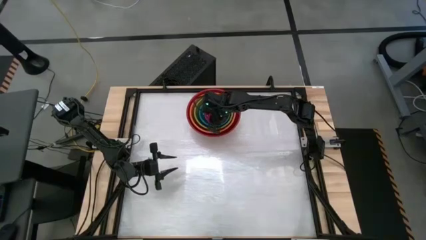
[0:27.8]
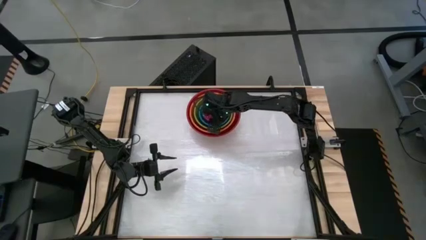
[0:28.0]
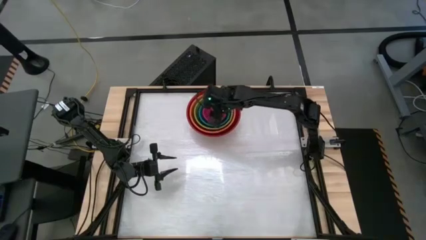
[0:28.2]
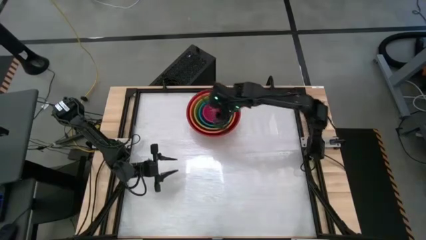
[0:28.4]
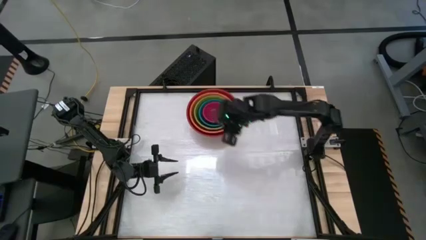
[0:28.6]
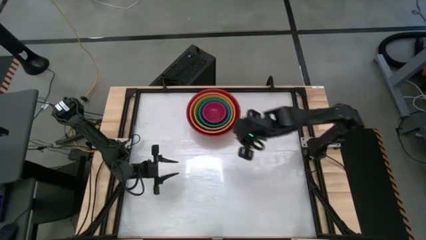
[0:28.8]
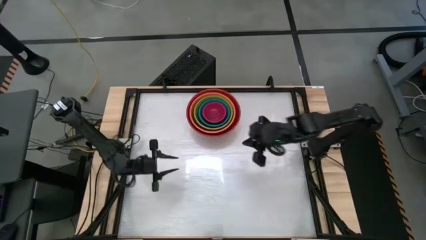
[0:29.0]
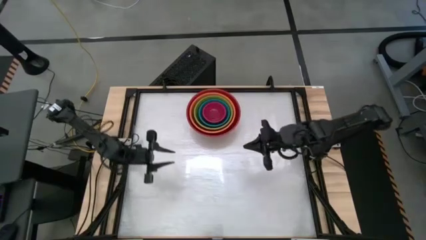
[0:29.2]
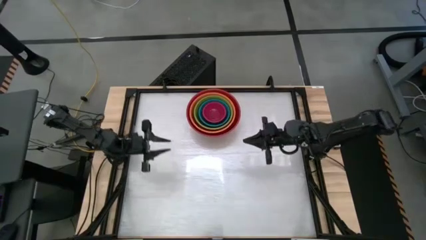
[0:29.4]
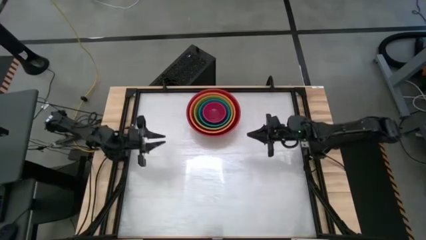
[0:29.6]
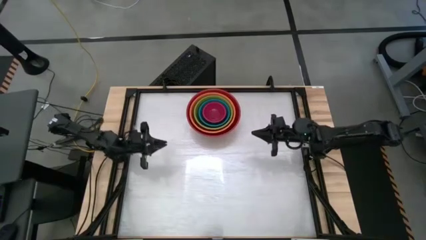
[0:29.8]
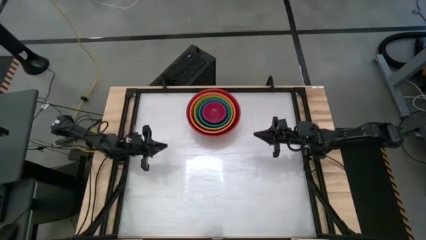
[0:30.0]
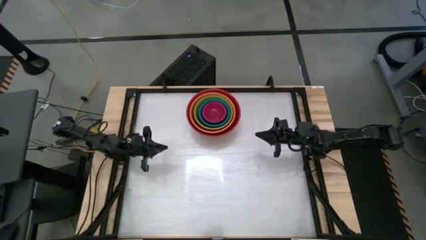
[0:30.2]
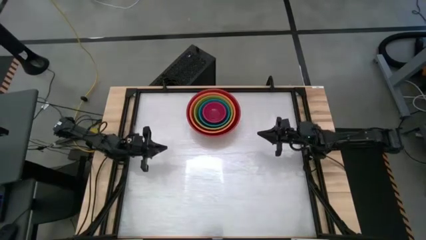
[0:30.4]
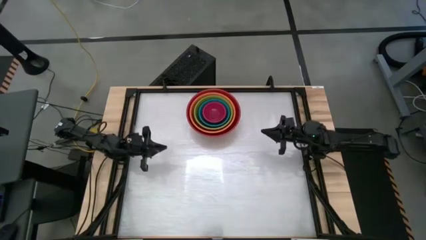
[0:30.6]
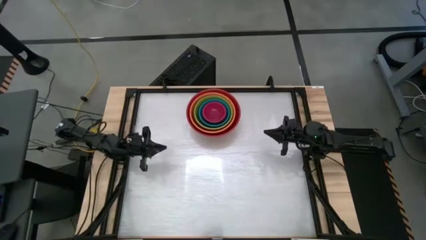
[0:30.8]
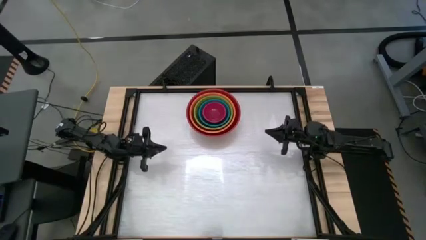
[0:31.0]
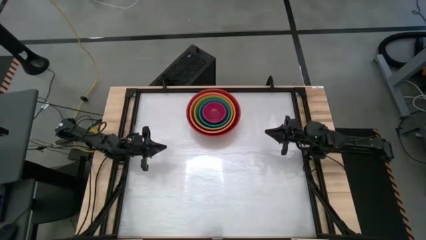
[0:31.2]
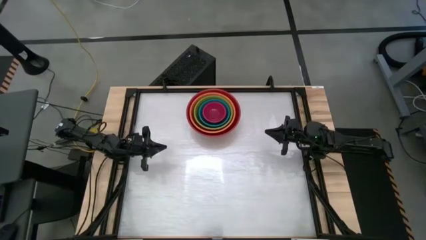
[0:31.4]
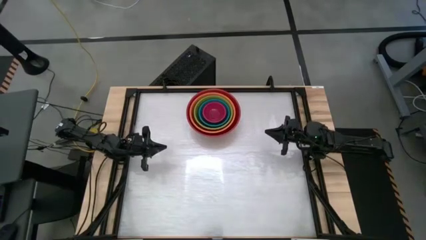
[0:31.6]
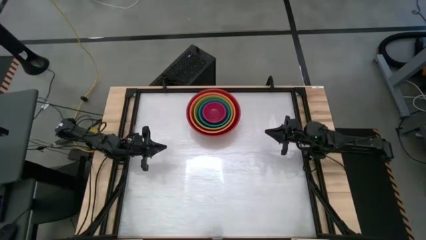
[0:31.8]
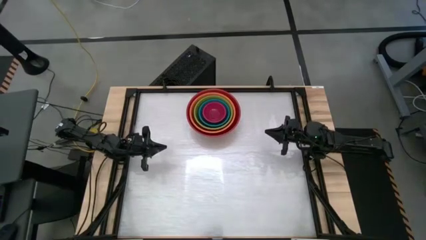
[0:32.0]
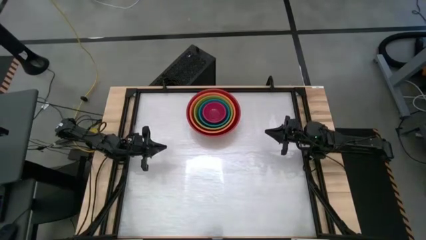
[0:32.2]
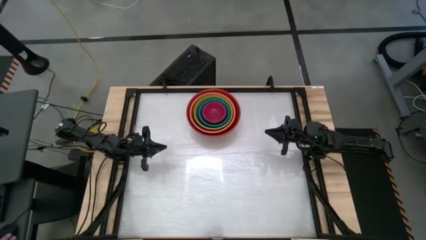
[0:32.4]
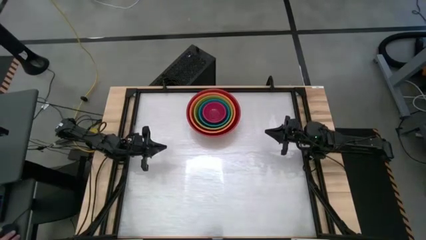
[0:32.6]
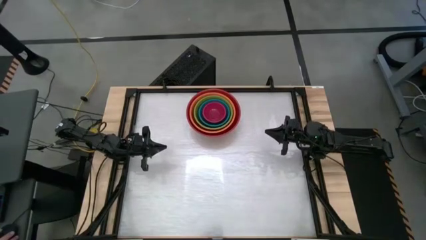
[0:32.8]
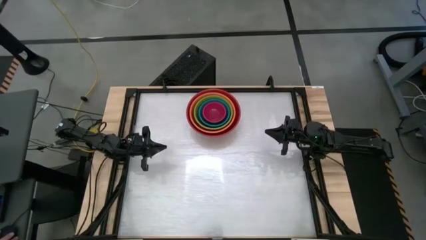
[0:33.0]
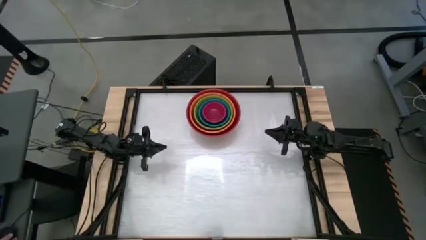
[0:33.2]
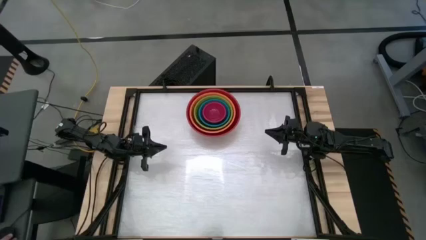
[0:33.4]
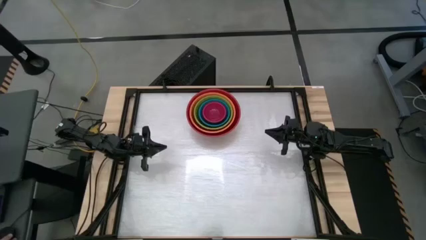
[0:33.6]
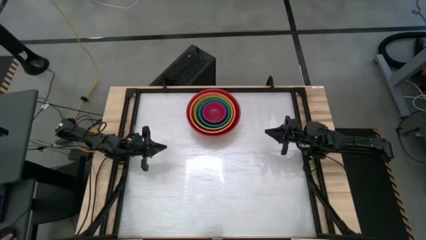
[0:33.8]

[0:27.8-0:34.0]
Return to Home Position

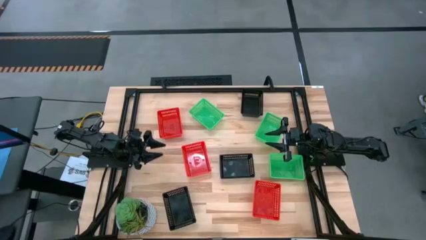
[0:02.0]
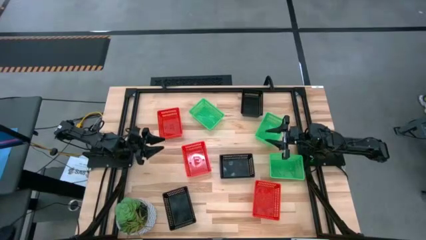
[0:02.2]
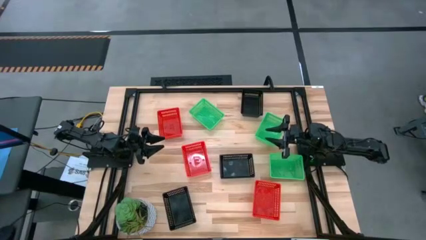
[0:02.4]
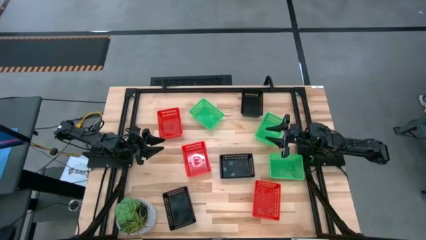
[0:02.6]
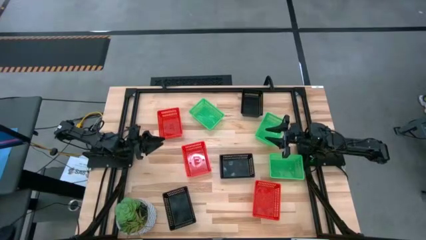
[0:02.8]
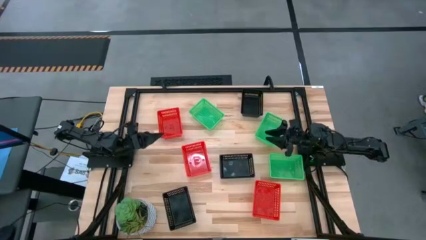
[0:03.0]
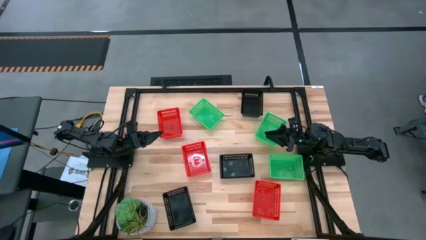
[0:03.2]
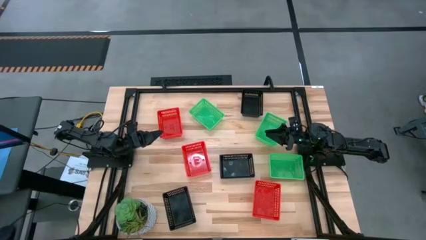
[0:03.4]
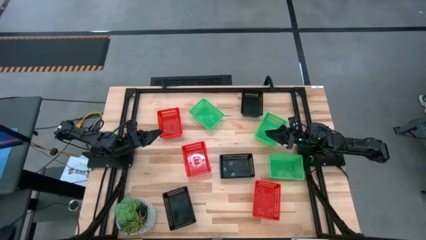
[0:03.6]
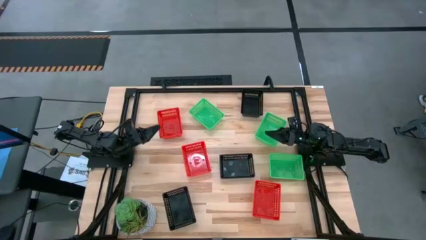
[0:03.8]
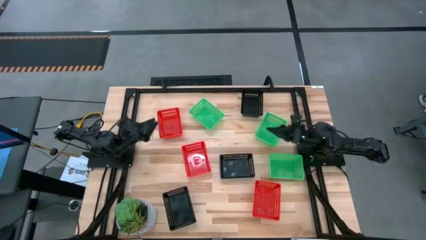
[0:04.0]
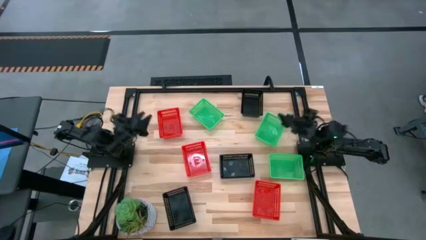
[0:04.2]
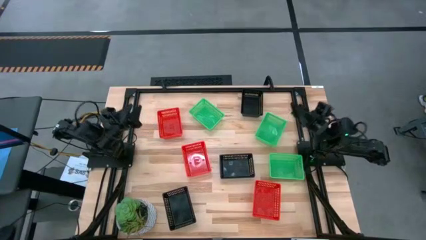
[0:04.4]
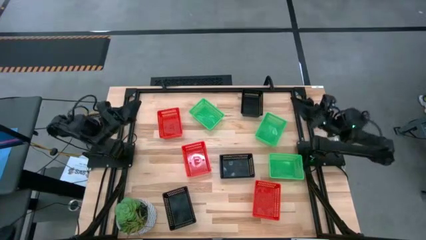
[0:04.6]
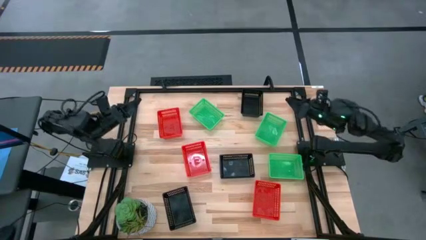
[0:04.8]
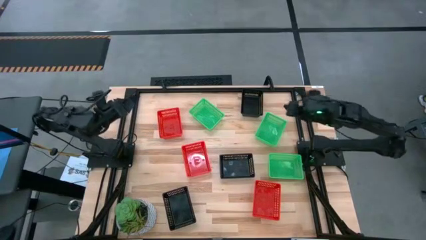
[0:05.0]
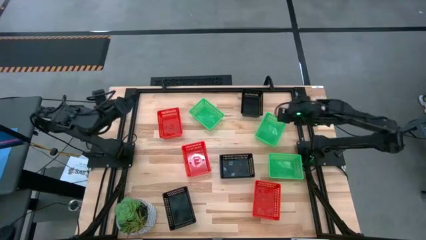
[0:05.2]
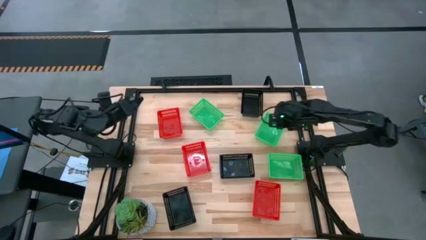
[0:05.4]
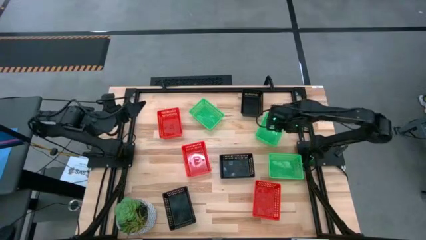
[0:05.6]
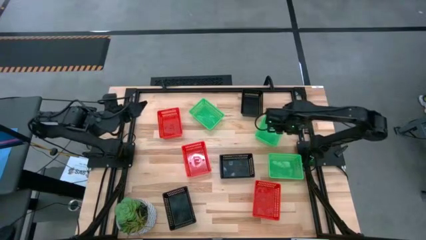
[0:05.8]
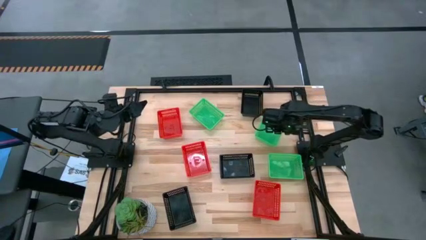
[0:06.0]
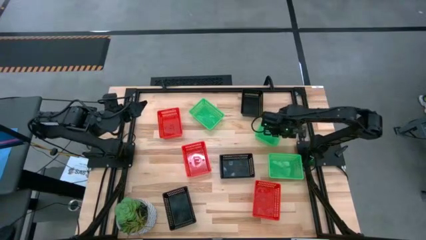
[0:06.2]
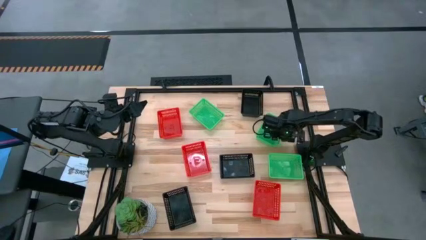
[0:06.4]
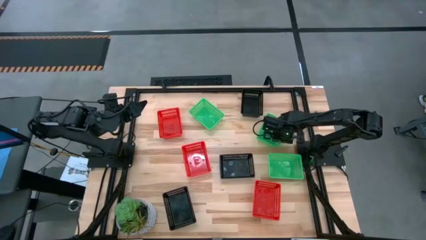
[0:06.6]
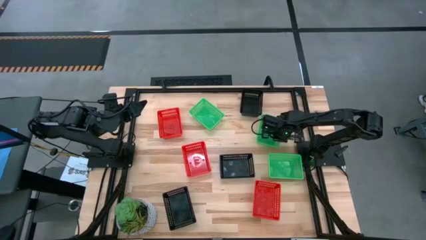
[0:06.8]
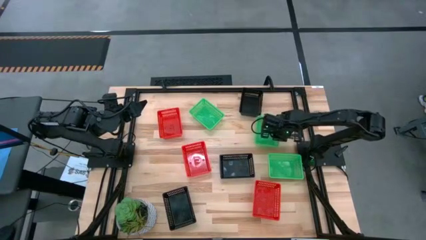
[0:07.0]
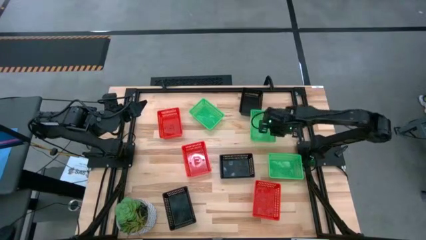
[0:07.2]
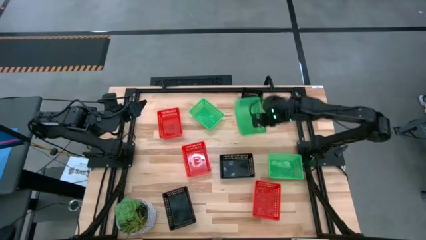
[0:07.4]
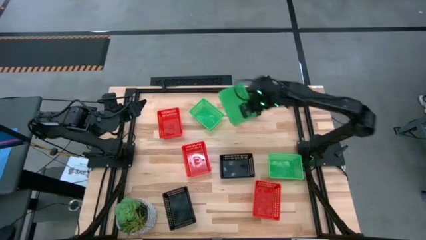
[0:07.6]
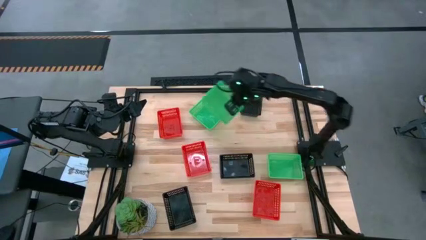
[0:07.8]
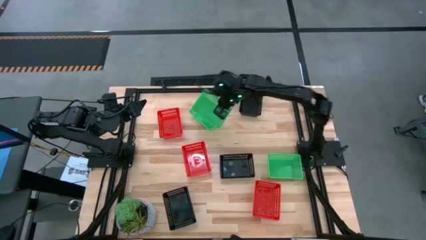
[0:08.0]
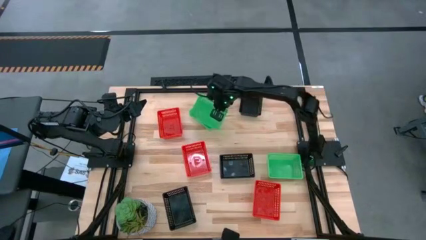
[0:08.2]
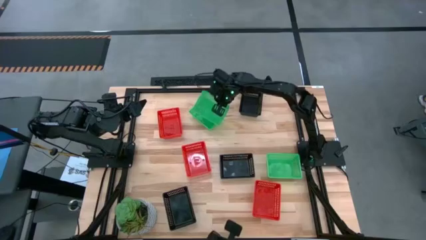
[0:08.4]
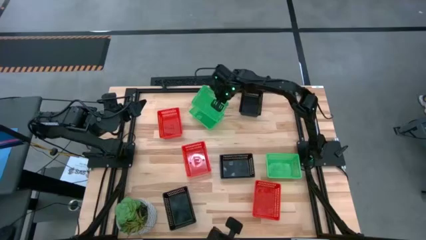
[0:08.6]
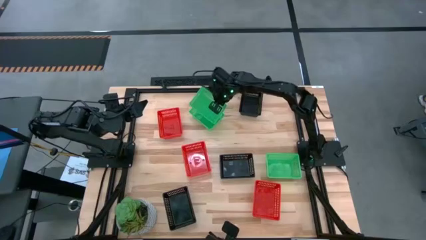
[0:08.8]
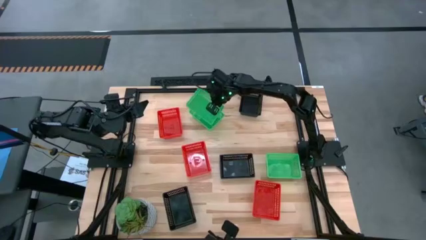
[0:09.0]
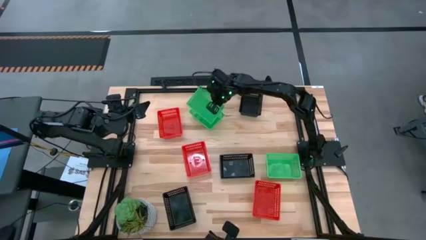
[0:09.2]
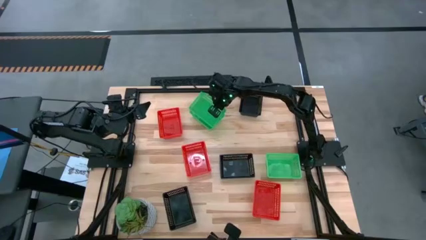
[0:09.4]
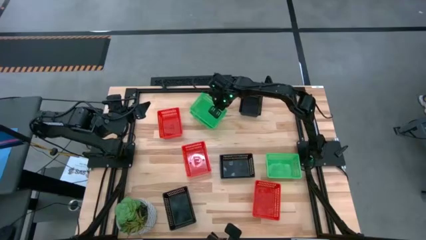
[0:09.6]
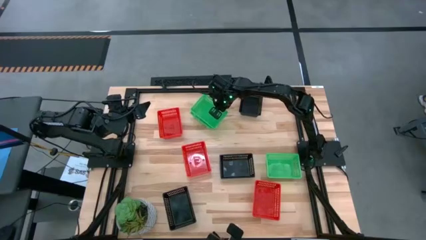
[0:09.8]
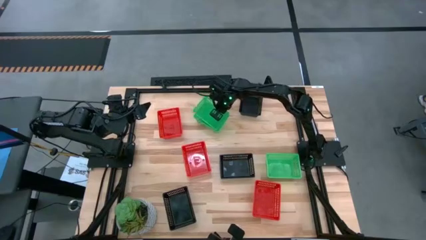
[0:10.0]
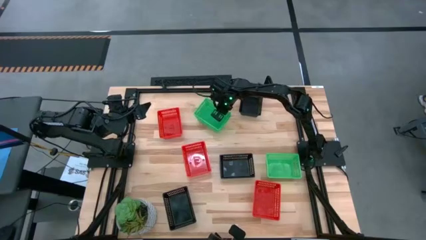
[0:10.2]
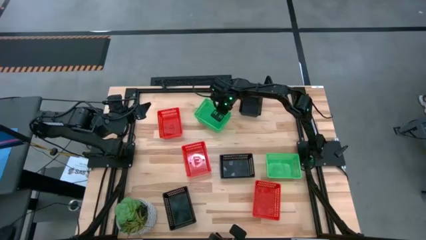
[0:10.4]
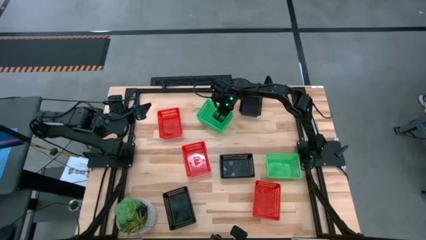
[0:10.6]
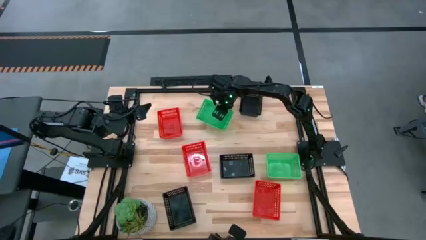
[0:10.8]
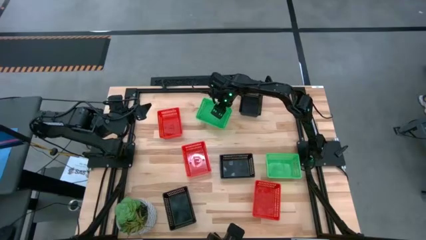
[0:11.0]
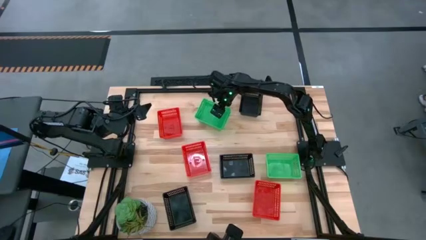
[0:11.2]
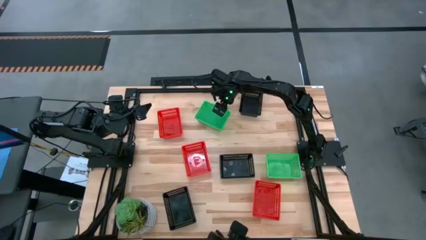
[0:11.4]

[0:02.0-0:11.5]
Stack the middle green bin on top of the top green bin

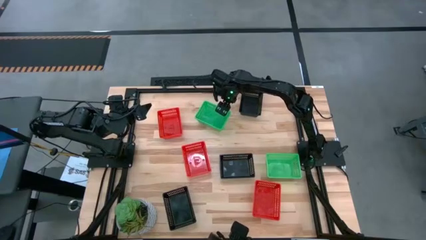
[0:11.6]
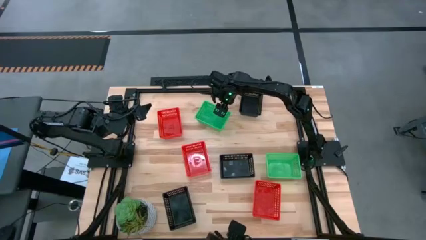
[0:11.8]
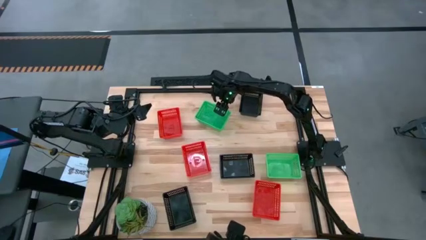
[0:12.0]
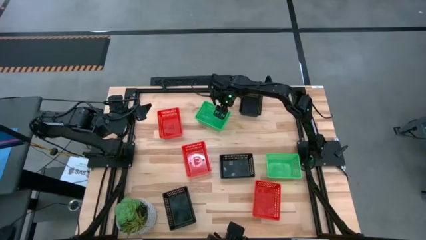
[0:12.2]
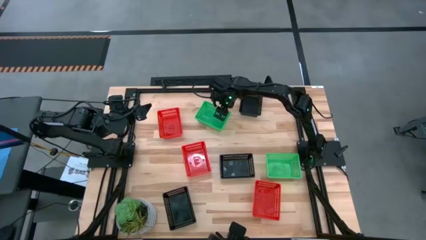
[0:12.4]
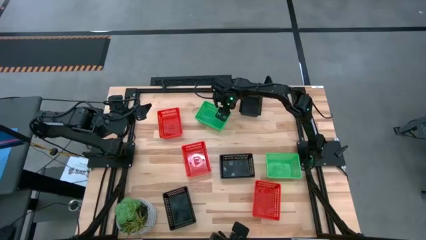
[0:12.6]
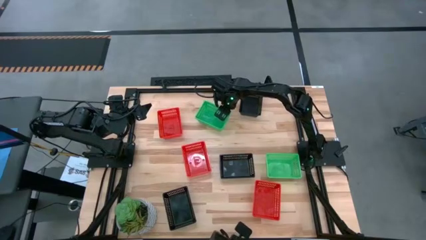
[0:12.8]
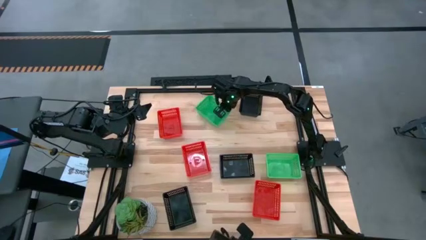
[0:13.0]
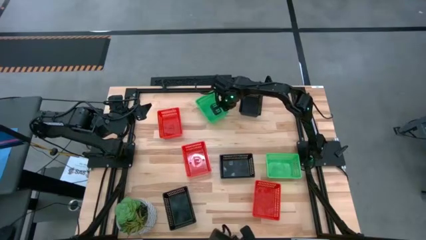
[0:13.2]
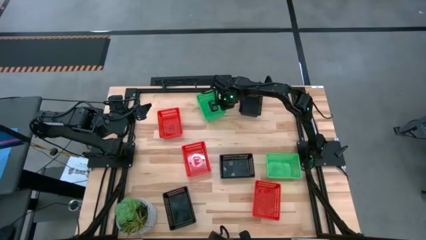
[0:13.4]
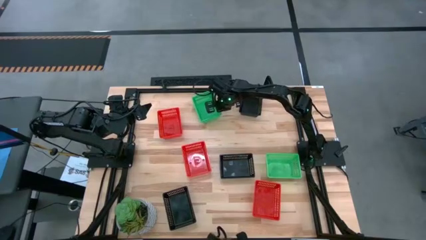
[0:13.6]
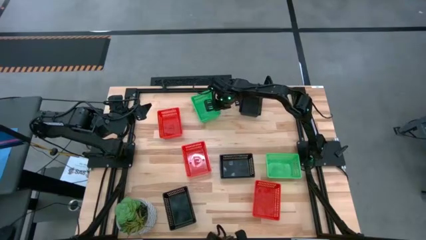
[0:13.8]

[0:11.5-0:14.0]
Adjust the top green stacked bins
